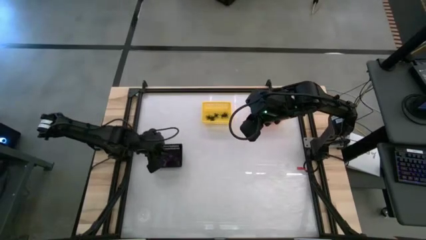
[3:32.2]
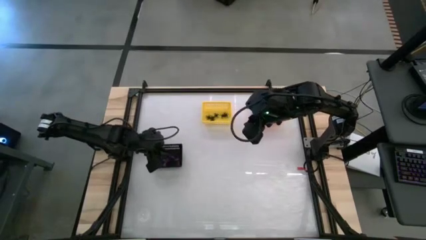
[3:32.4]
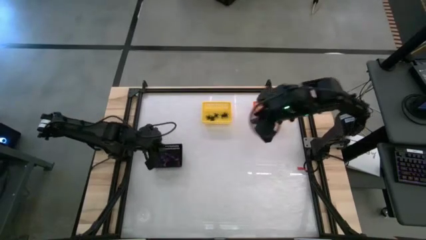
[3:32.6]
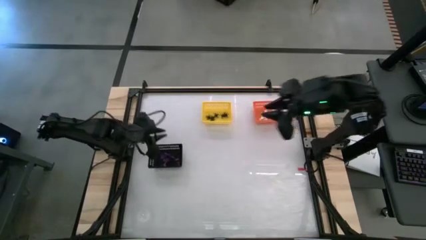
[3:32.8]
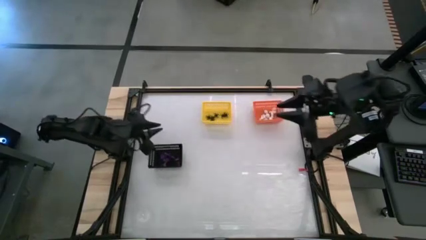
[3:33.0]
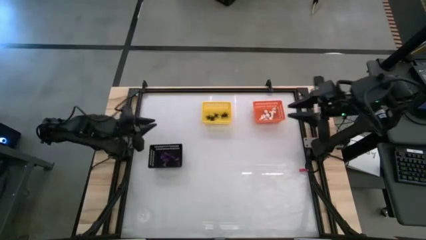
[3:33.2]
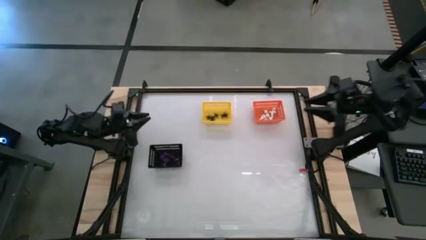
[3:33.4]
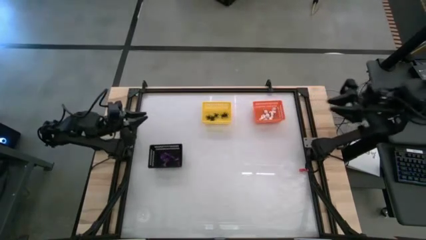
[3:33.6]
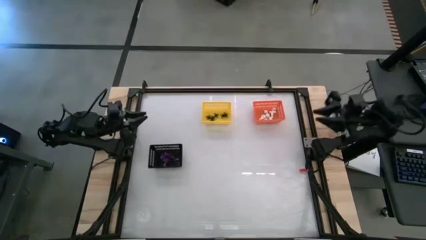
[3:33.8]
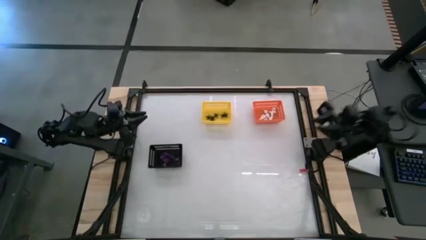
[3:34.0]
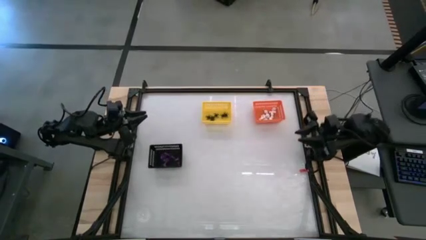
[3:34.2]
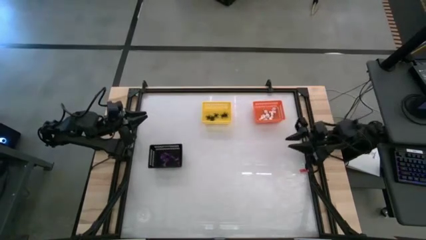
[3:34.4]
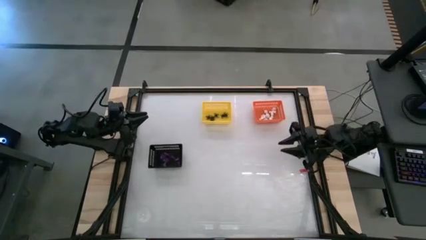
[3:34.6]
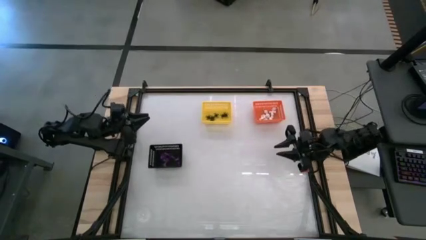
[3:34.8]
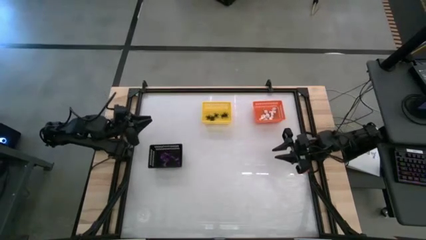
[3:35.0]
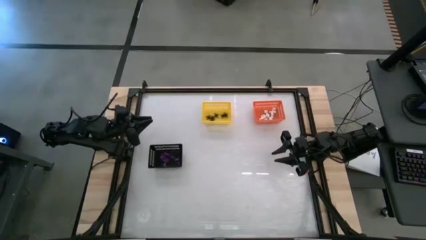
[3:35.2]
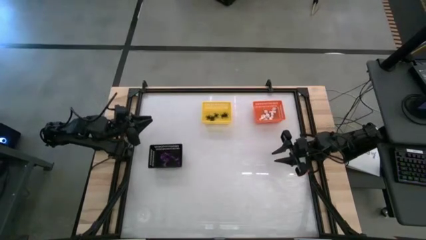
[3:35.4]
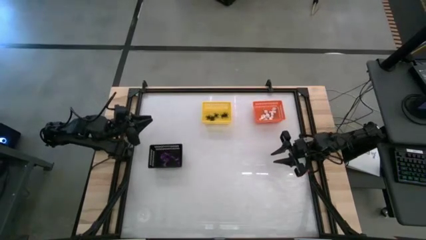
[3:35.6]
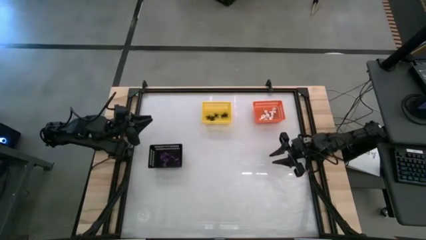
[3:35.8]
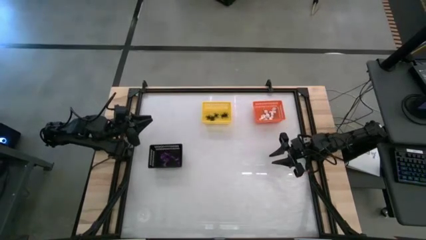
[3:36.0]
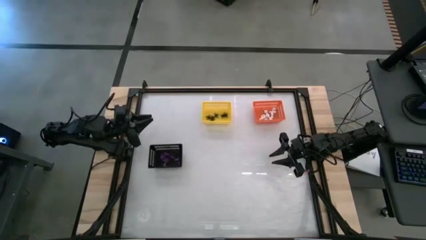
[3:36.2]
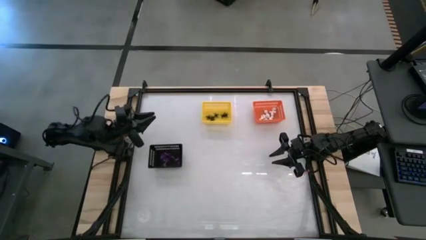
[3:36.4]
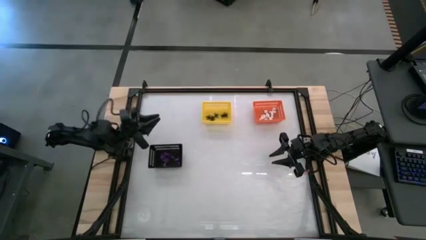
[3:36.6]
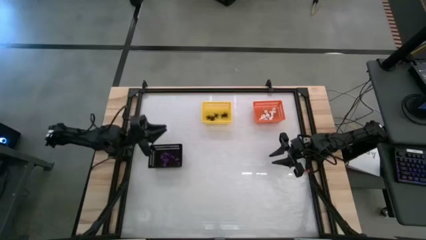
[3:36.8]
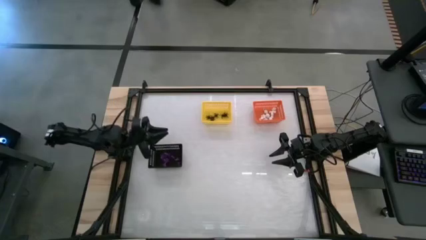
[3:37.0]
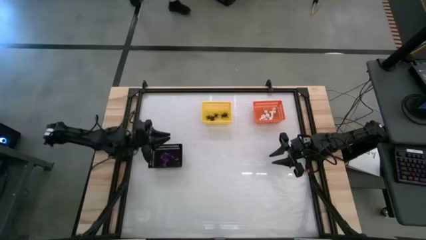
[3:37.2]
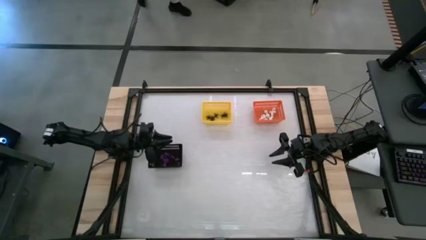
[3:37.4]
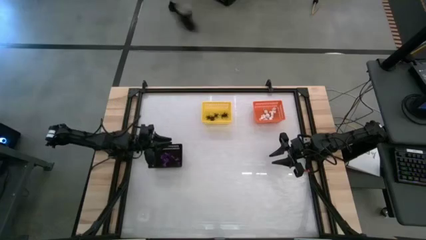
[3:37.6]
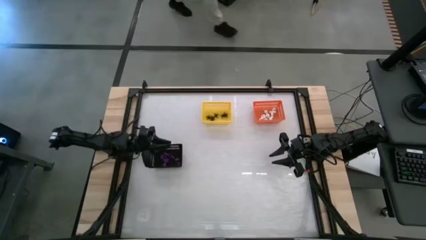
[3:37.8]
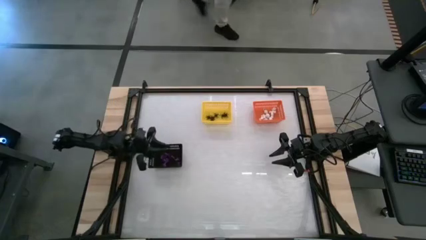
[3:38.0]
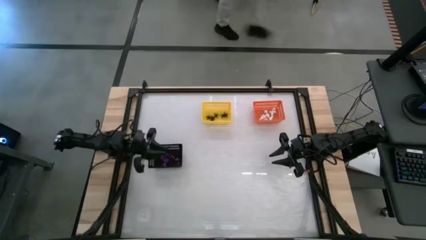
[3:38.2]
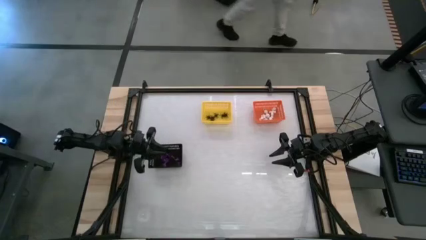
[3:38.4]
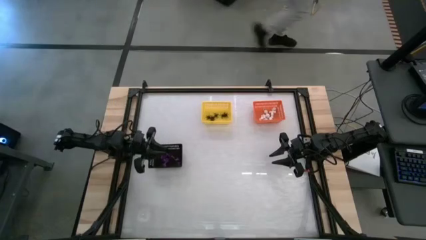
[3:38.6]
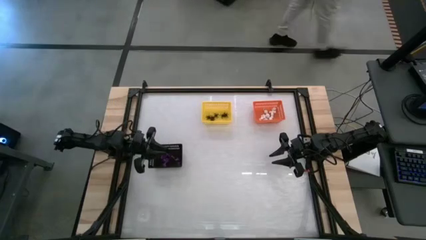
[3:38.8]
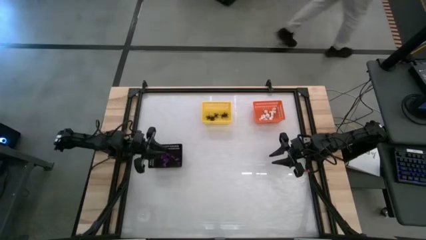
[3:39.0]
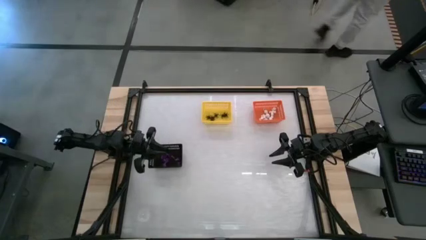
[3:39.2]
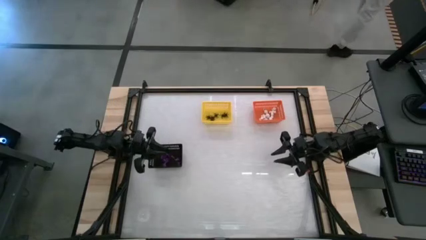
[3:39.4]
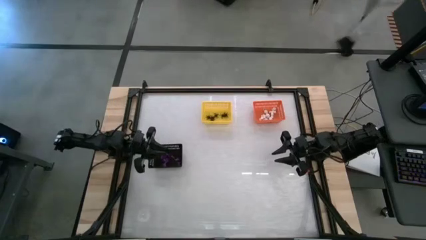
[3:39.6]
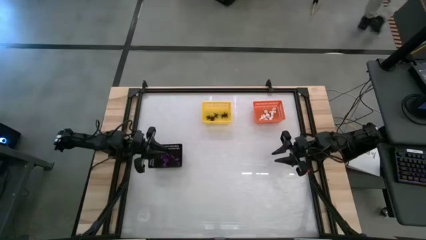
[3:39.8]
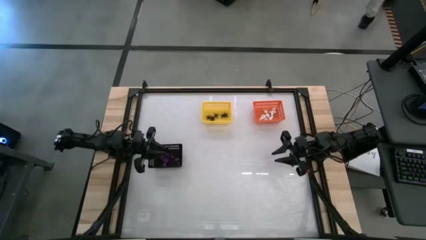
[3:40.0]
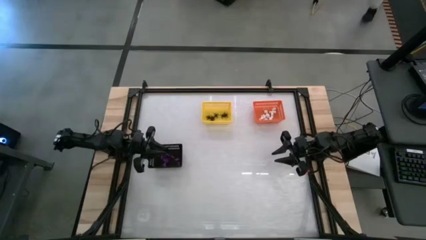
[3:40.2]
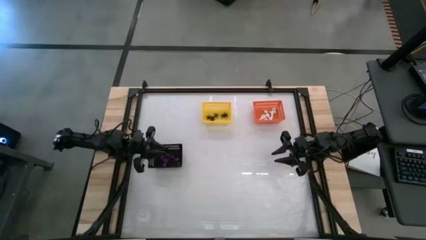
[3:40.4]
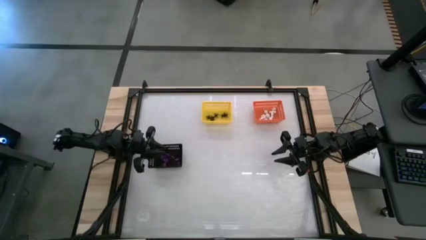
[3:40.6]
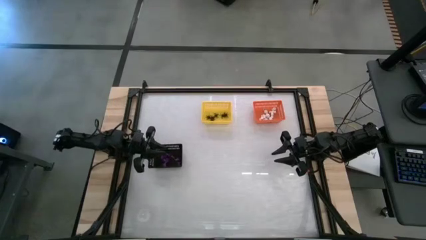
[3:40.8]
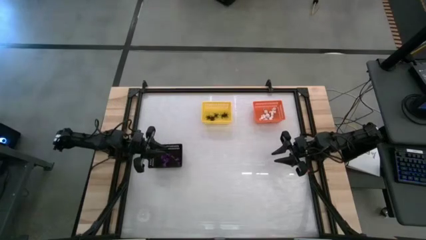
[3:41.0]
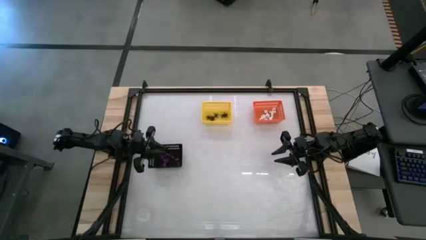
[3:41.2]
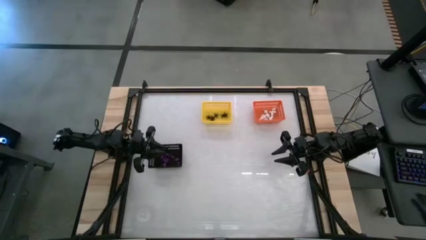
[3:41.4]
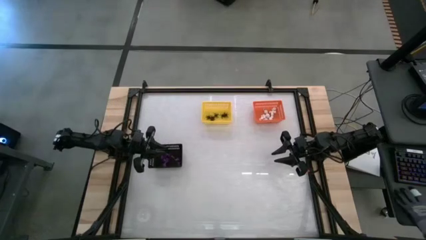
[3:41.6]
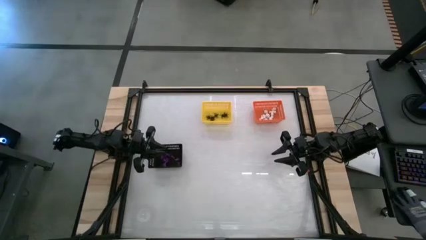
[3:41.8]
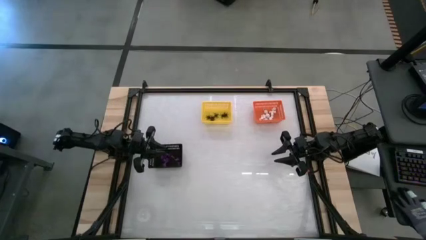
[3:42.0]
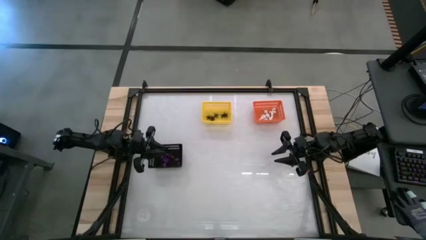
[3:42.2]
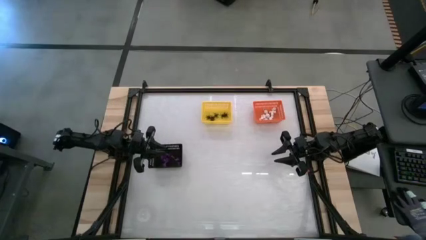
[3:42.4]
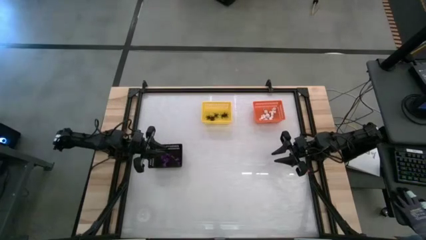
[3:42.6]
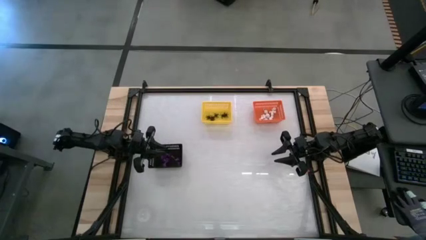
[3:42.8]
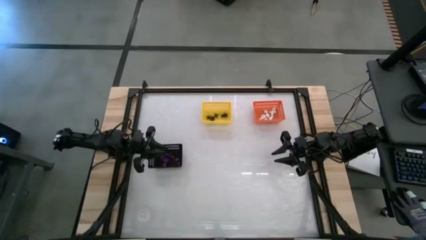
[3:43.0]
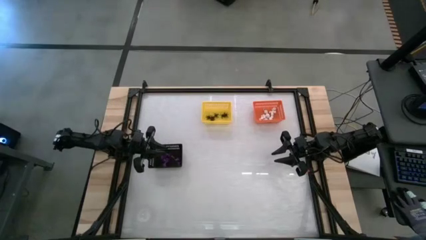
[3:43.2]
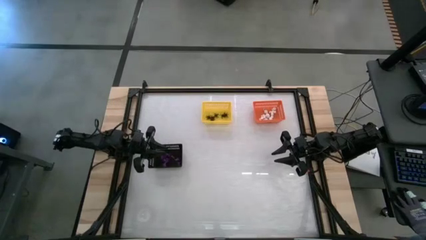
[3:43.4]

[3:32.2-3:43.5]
Task: Sort Halloween decoration
Return to Home Position

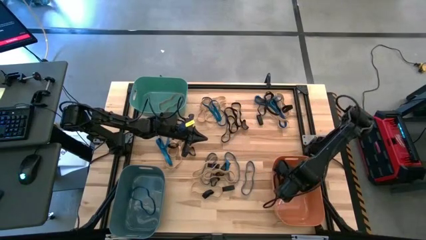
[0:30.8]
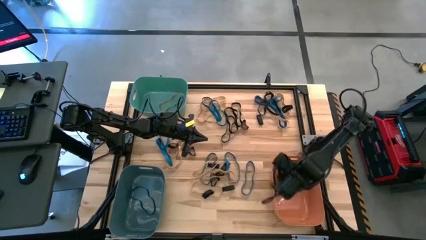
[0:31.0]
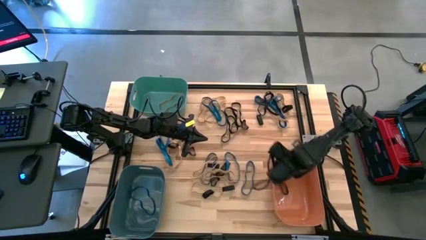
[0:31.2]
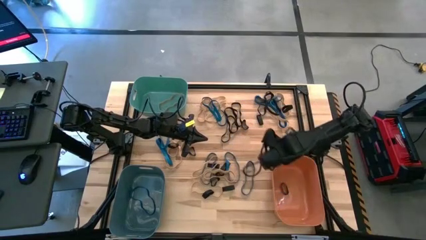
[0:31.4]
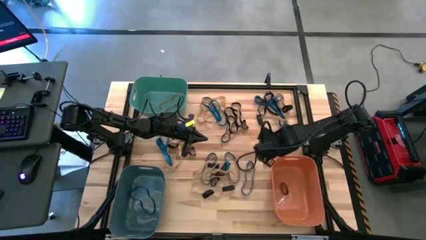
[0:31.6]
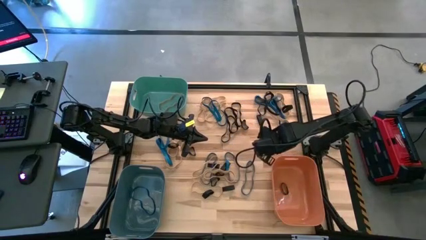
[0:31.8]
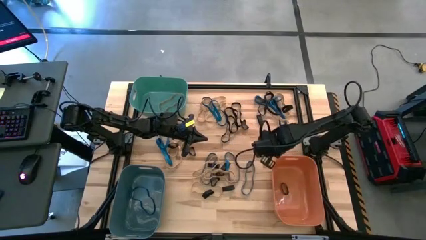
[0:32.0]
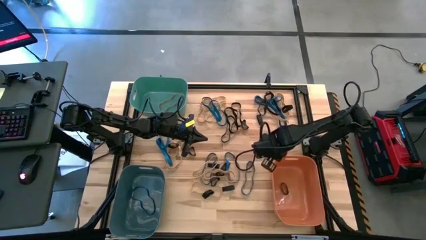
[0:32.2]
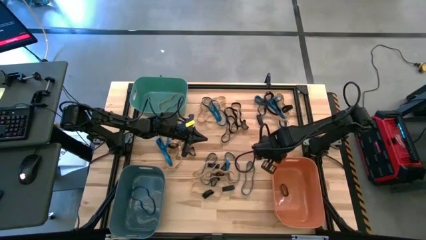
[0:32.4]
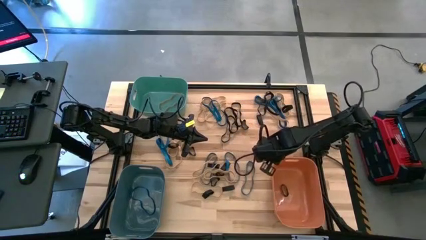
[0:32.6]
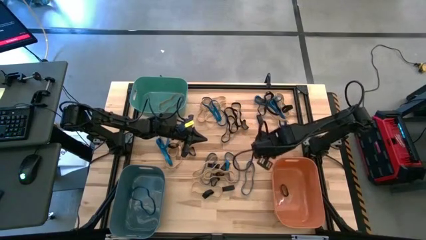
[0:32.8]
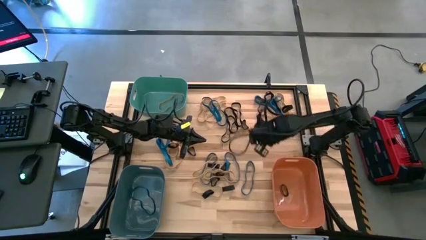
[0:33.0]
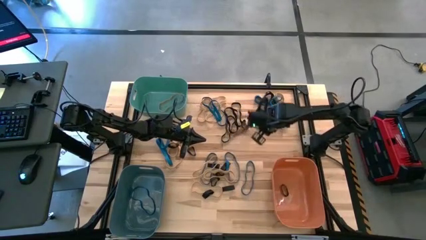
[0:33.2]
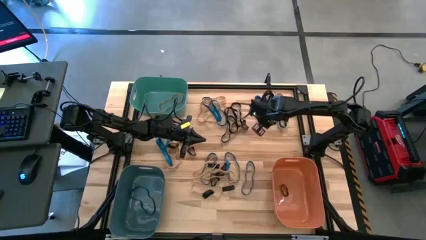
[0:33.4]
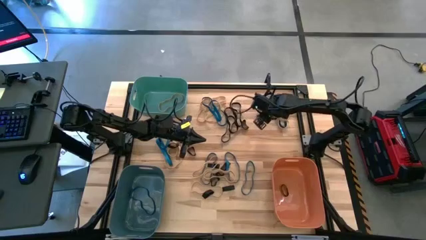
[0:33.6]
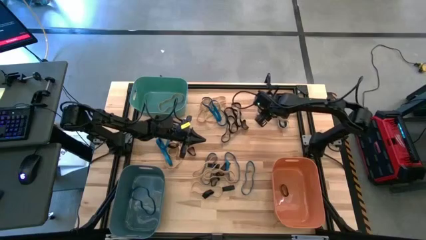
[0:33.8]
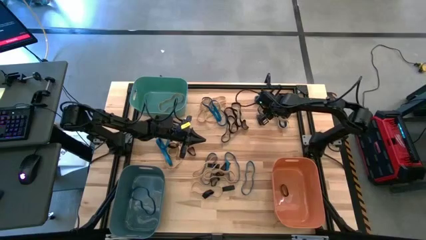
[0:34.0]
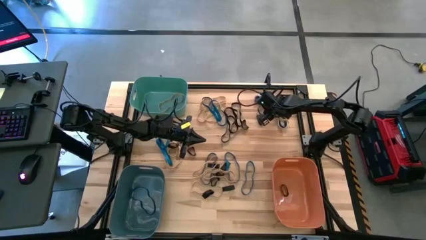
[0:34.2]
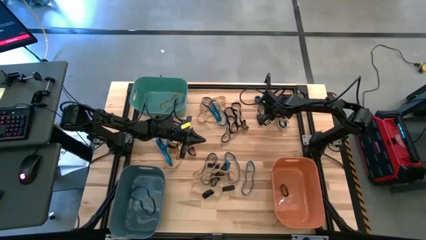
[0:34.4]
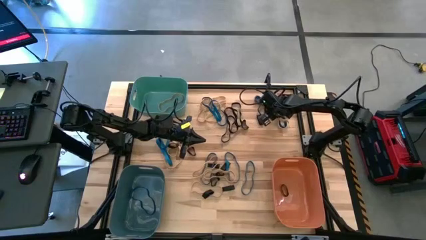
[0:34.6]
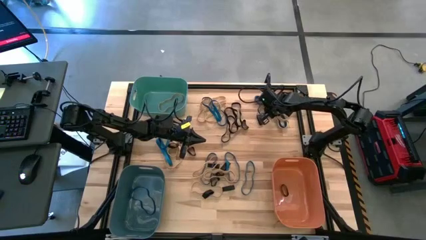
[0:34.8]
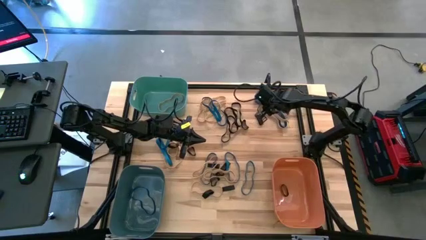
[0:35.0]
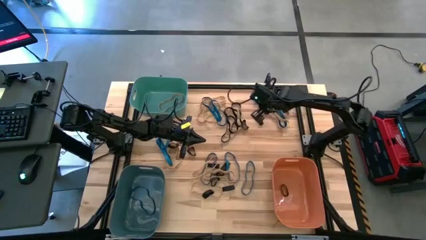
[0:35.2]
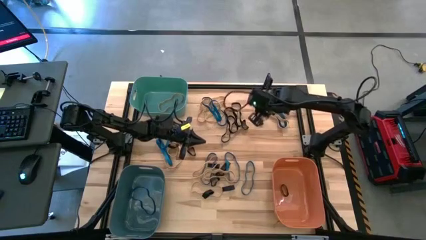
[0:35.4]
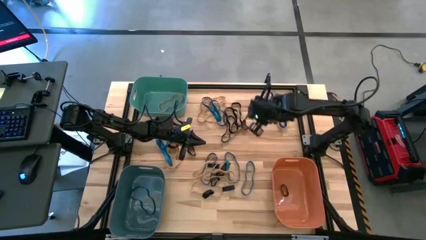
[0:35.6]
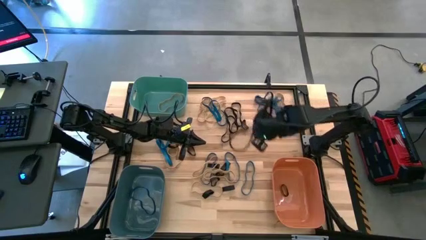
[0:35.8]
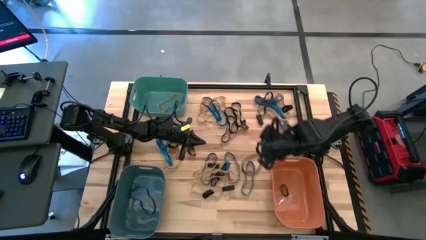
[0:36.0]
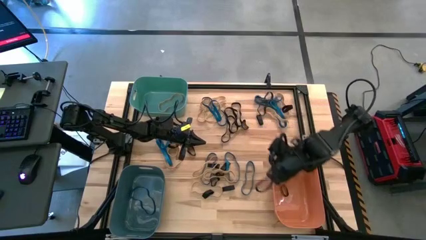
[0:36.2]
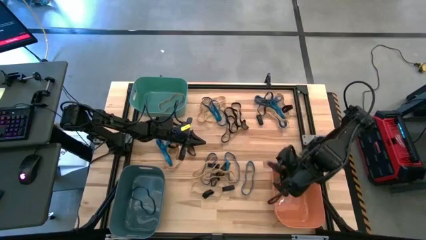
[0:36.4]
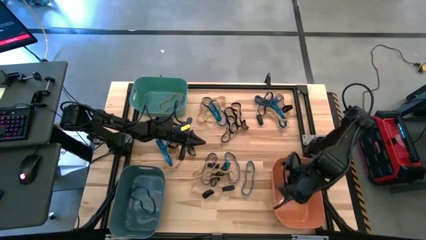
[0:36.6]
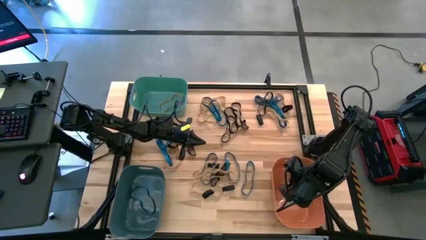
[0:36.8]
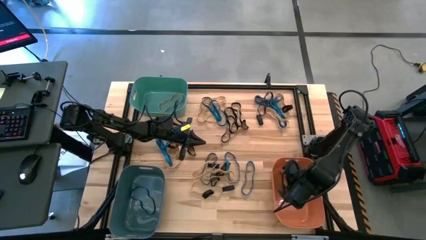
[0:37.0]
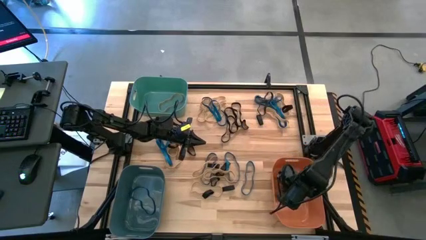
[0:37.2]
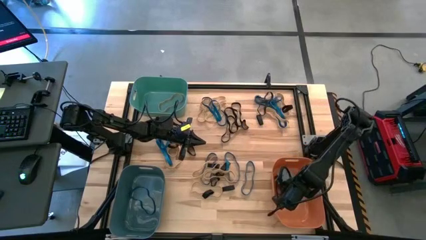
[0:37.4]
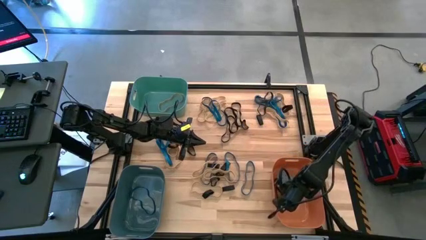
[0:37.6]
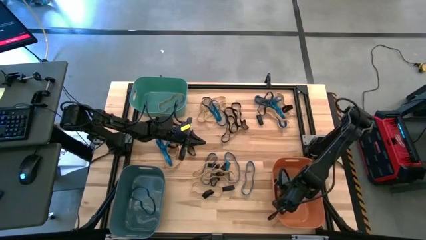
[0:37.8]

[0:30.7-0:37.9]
Task: Sort rubber bands into baskets
Put the black rubber band into the orange bin
